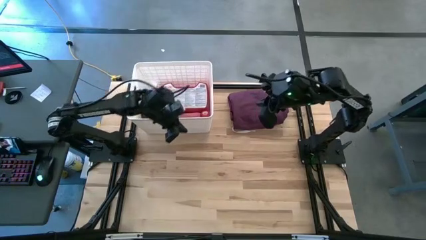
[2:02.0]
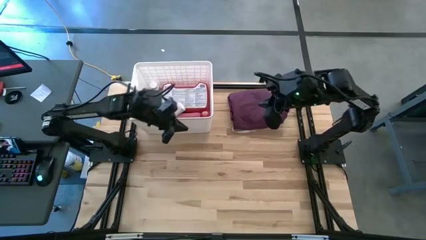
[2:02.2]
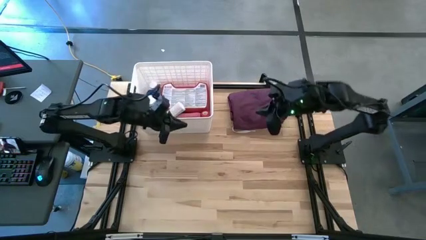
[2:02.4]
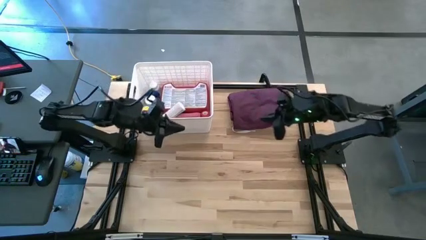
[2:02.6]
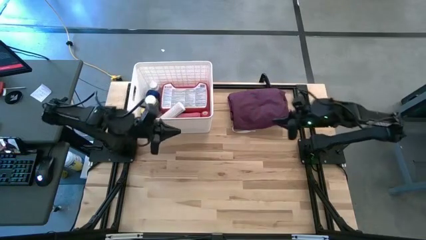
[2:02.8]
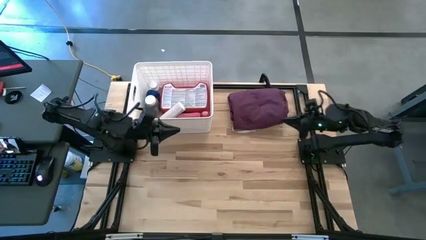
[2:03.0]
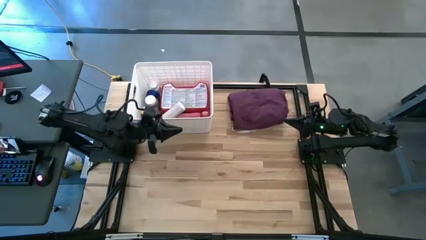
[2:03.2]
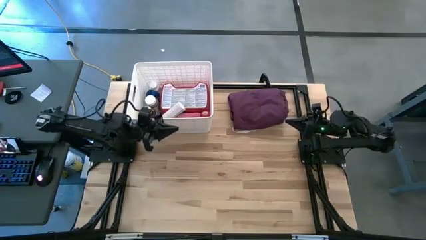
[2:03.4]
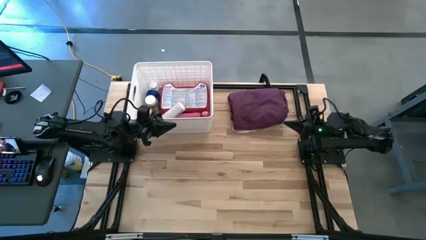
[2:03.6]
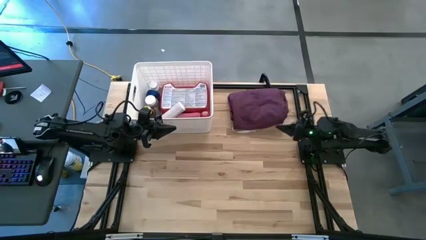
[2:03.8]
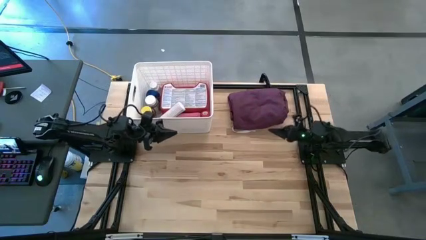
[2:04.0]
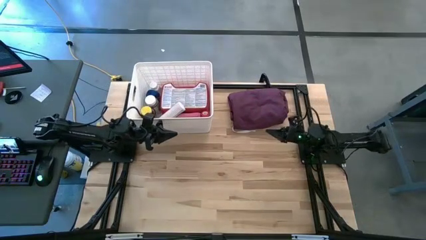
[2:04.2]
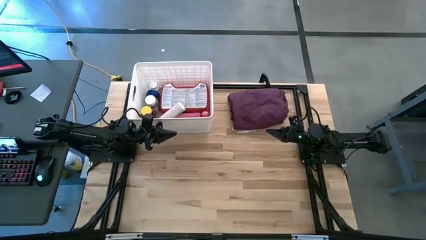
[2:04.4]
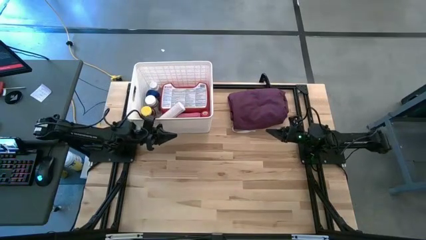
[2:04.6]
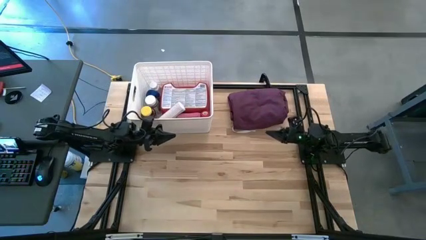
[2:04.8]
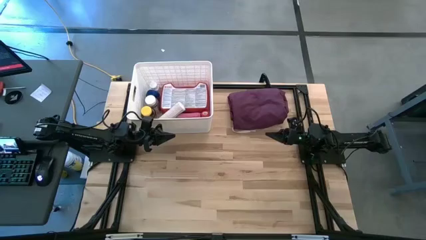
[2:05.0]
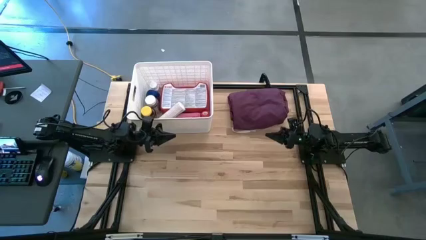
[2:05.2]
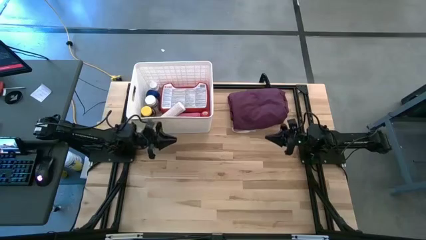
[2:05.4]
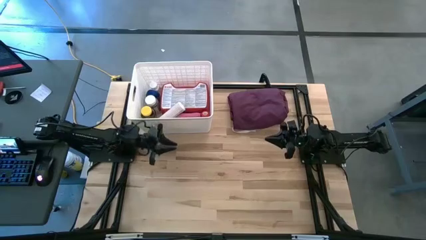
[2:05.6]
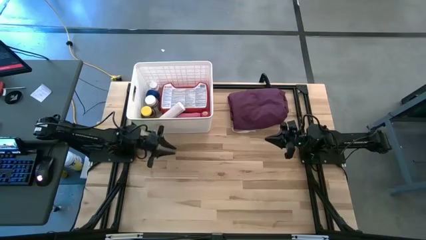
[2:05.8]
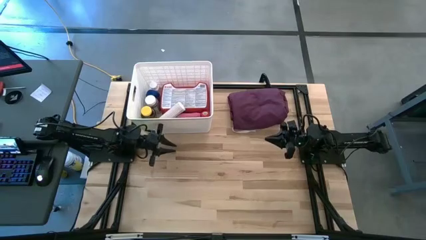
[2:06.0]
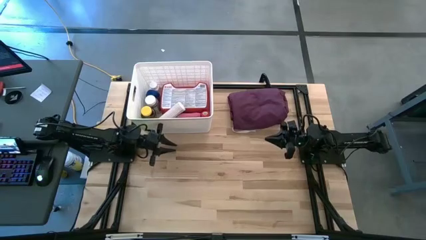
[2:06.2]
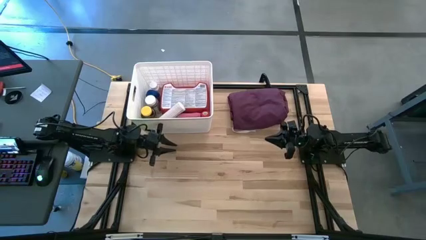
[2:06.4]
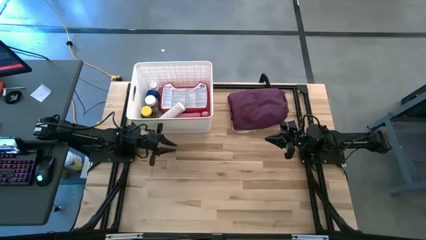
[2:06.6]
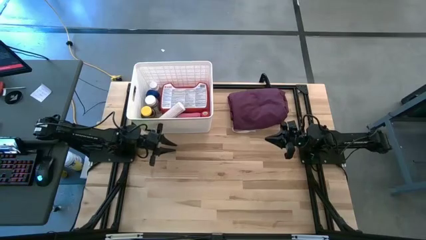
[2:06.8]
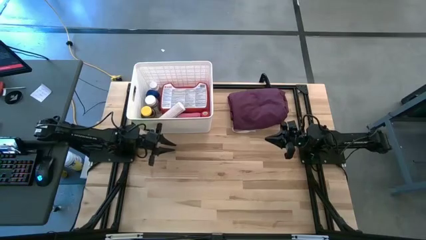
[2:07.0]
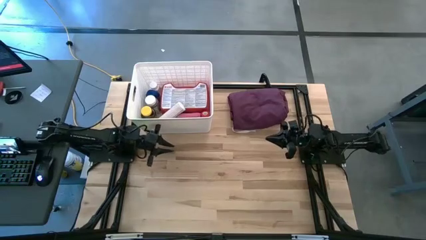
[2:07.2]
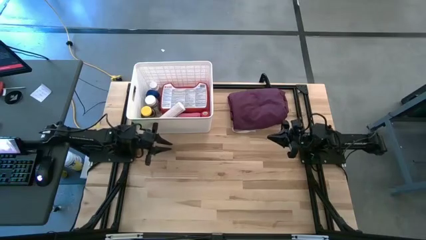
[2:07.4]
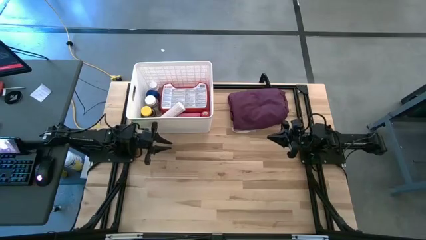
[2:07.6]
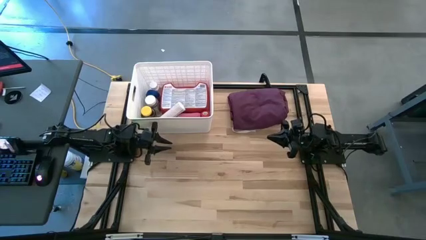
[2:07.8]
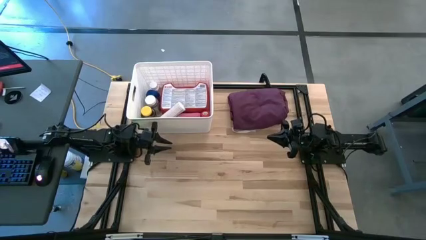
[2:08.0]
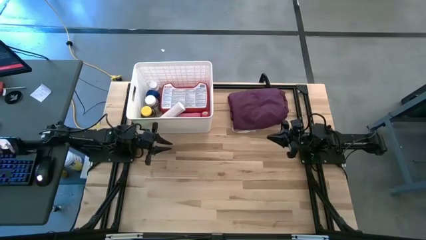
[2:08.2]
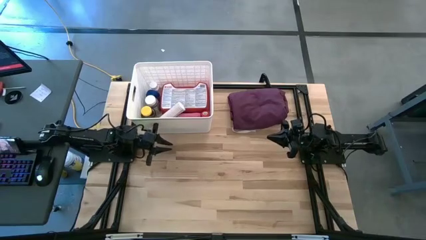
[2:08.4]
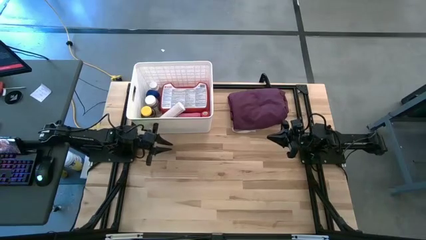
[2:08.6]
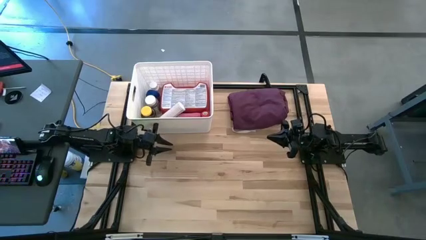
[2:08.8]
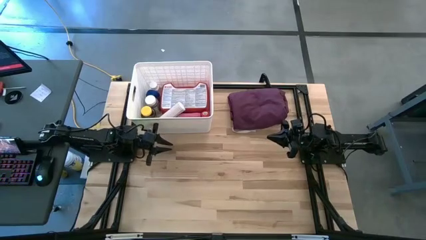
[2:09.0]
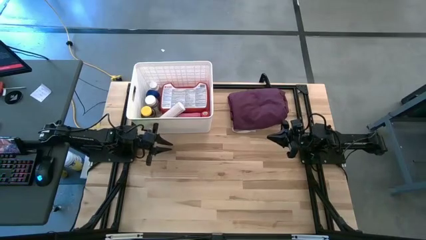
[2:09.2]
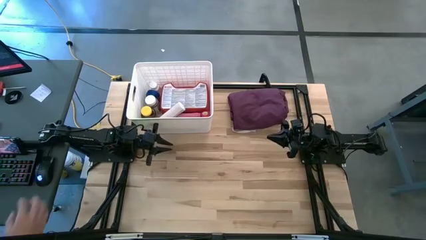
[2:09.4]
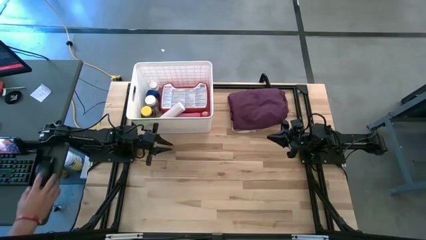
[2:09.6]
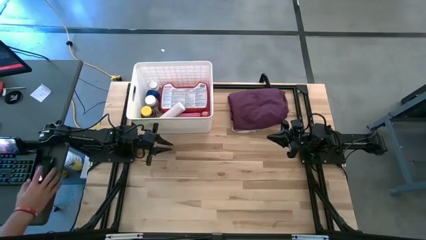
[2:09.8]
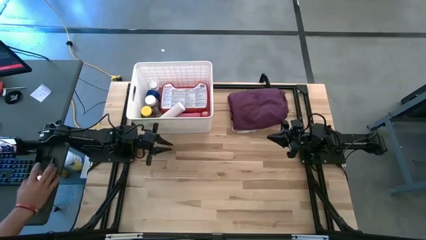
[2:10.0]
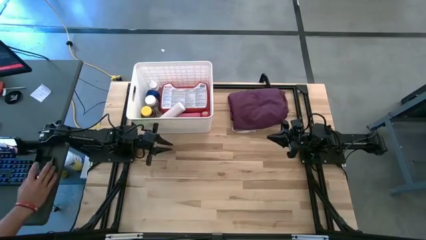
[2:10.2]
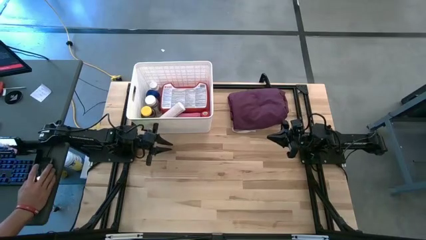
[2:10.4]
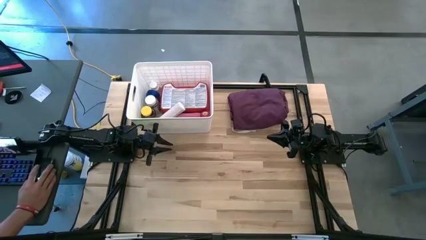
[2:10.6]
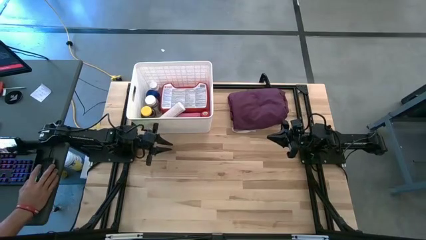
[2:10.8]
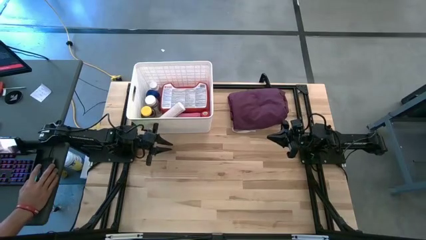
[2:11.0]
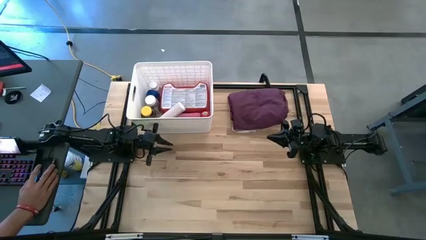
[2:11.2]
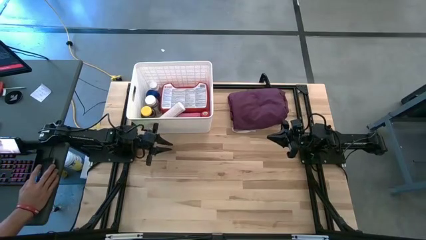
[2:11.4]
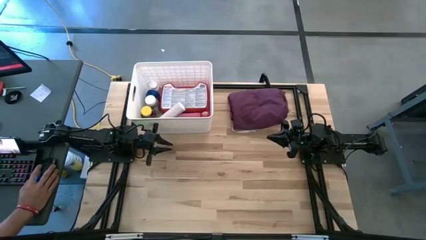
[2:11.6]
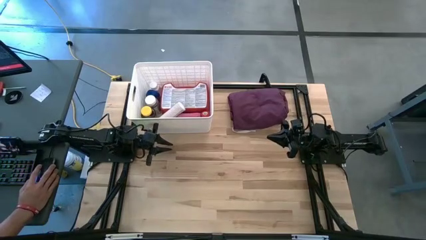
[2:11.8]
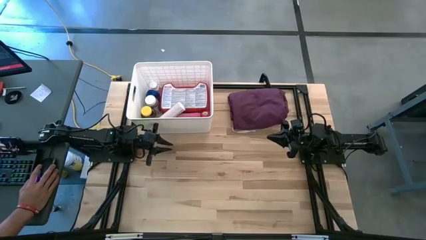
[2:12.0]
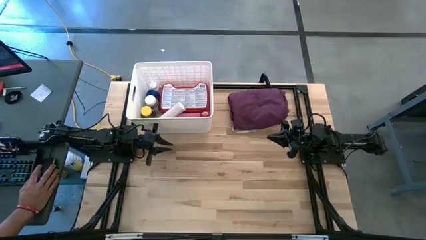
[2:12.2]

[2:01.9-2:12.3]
Task: Pick & place medical supplies in basket/bin
Return to Home Position

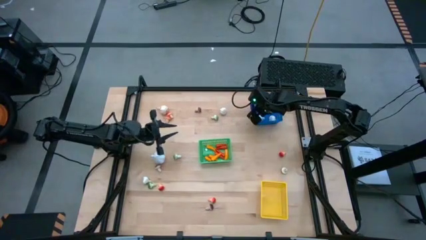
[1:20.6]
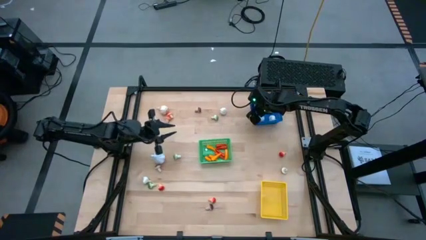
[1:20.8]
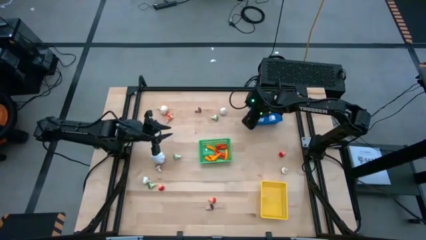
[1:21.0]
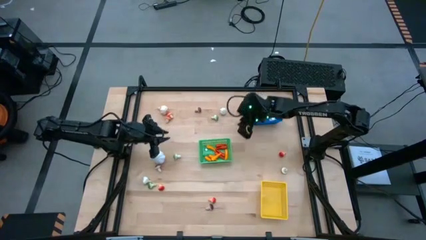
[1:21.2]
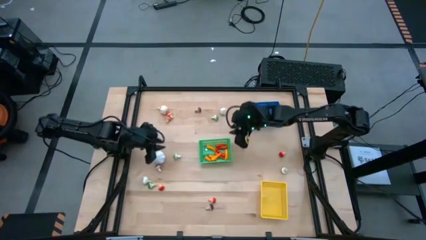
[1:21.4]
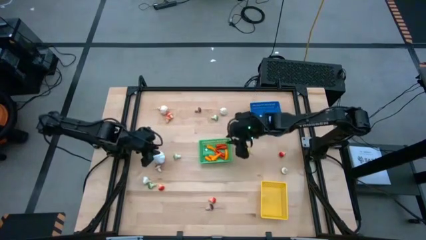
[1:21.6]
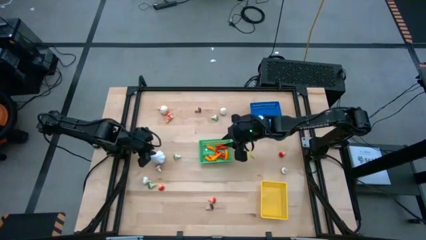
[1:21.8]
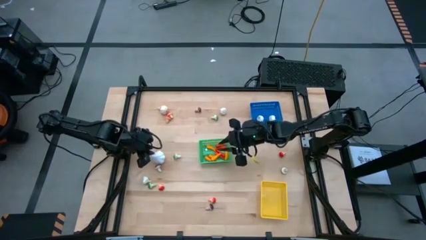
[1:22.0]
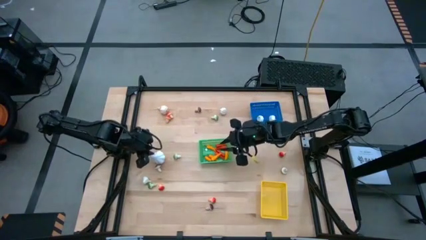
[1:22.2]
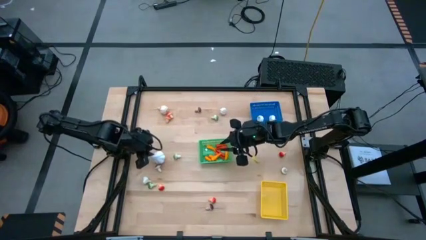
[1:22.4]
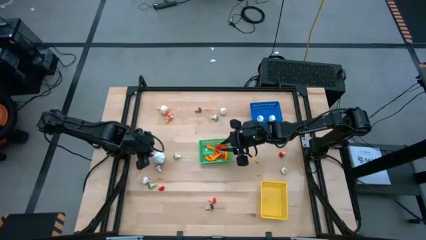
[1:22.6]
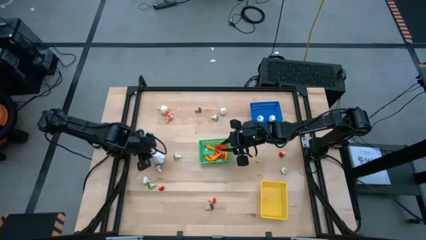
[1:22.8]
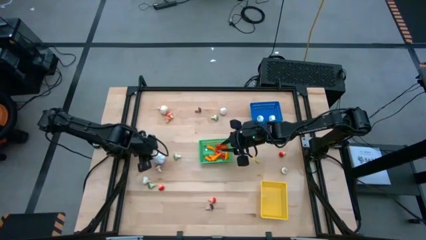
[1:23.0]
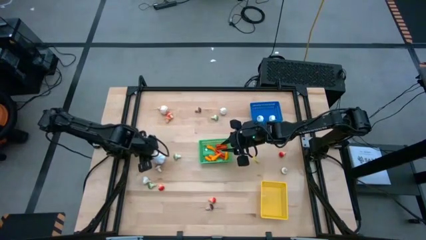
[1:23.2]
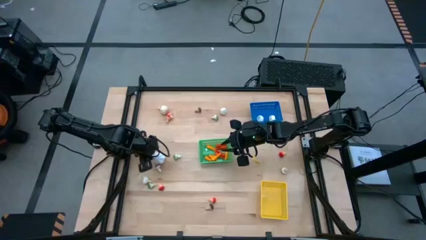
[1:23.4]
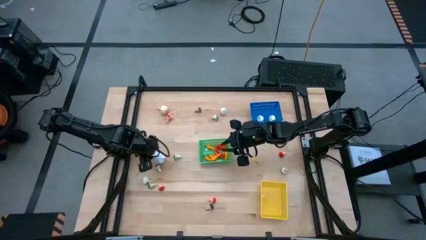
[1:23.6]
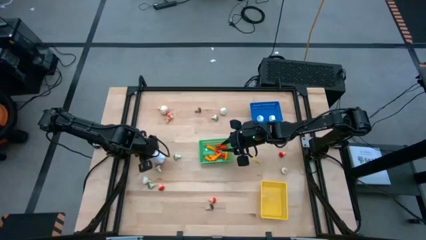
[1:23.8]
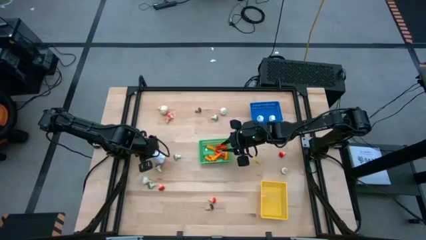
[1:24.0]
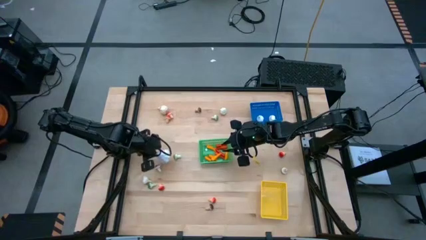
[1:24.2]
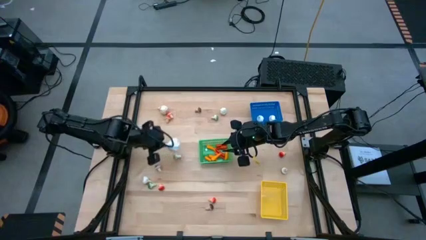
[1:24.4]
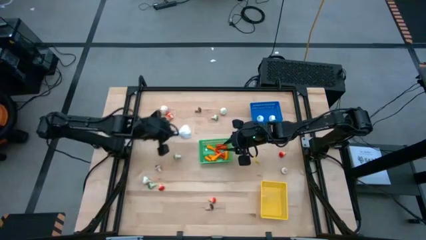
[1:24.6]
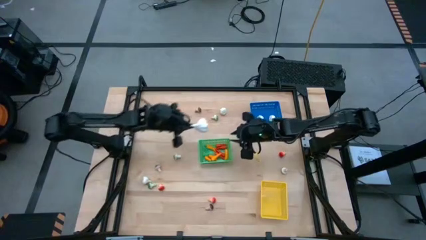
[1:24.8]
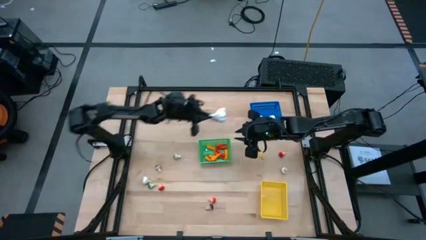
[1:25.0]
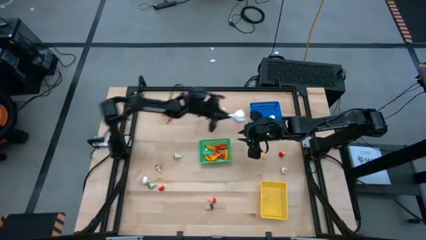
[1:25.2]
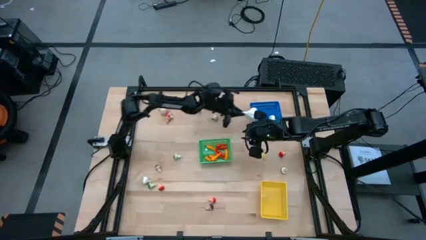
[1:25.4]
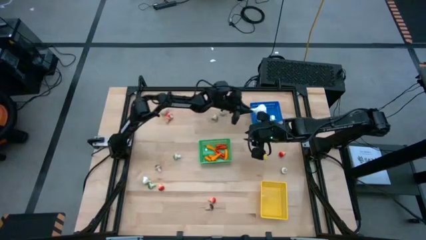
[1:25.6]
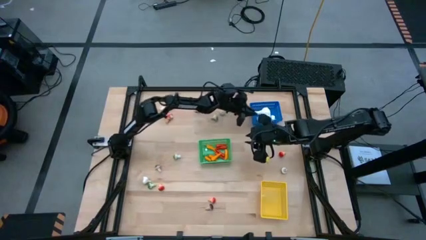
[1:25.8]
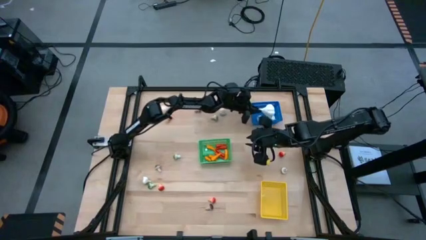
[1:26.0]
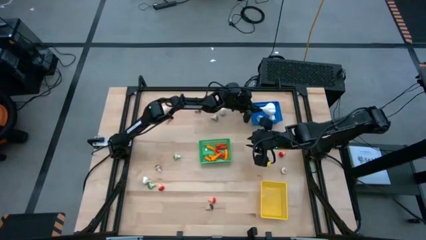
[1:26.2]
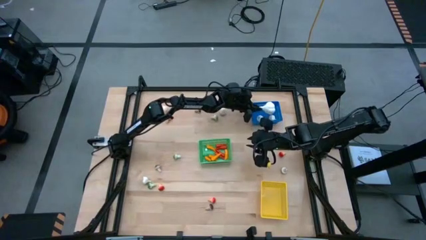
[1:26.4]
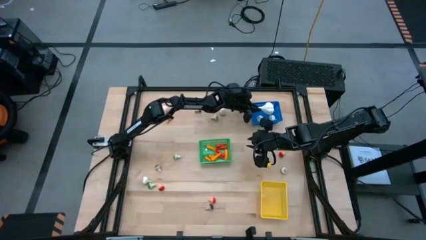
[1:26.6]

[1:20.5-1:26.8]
Task: Sort produce into baskets
Put the garlic into the blue bin
